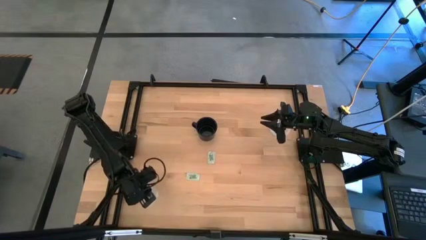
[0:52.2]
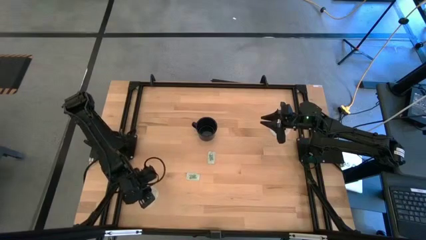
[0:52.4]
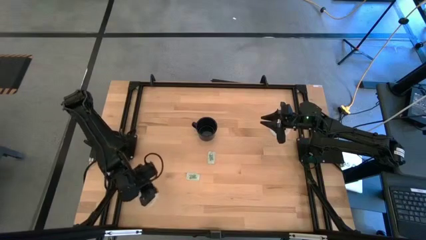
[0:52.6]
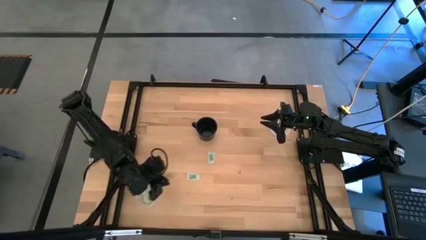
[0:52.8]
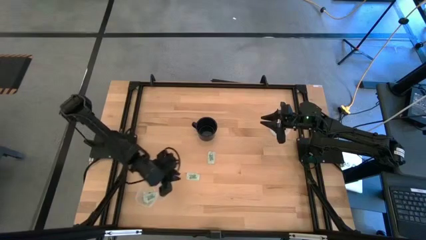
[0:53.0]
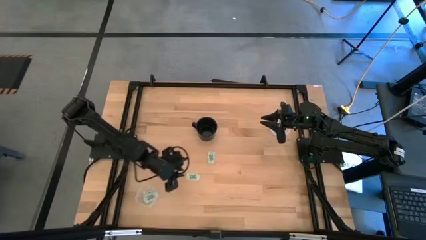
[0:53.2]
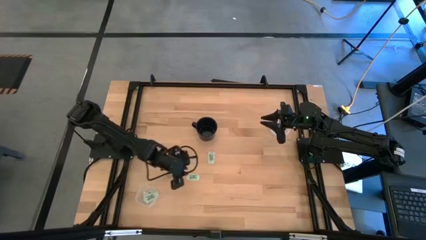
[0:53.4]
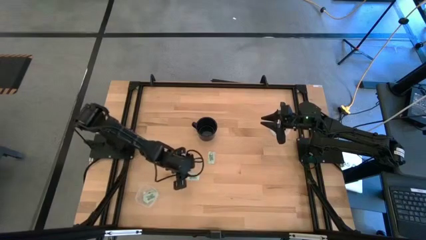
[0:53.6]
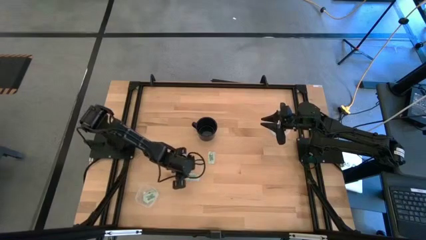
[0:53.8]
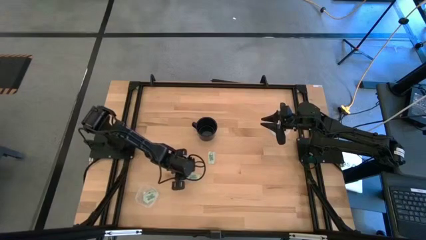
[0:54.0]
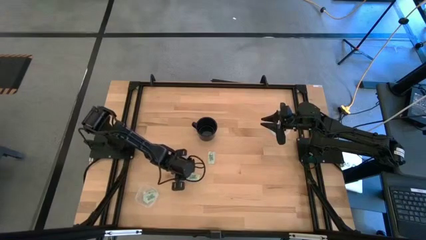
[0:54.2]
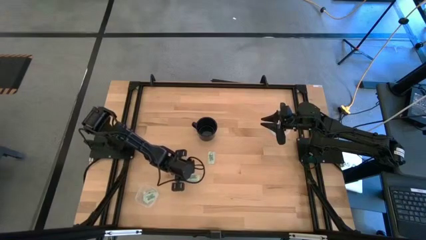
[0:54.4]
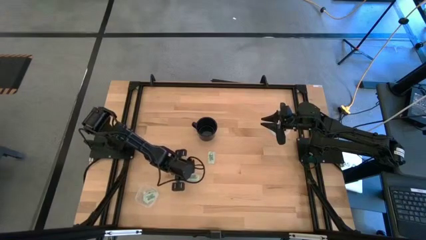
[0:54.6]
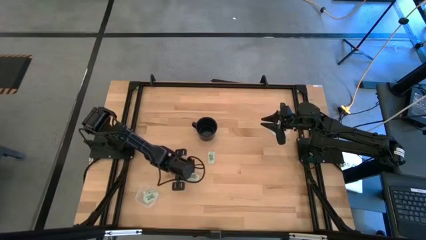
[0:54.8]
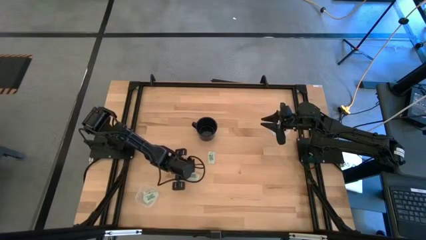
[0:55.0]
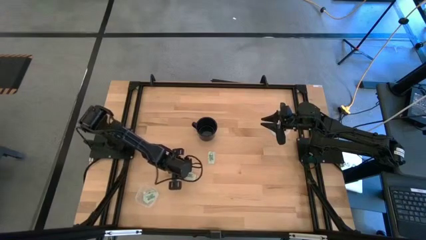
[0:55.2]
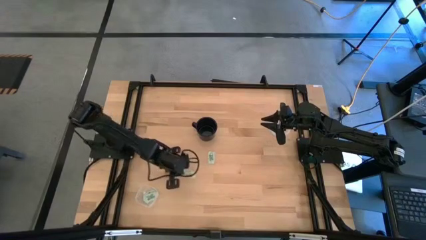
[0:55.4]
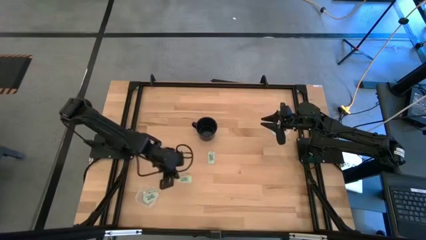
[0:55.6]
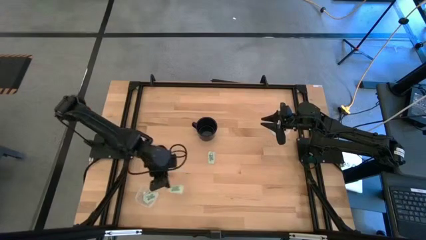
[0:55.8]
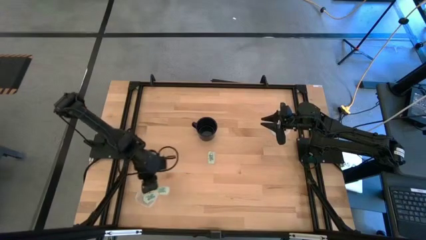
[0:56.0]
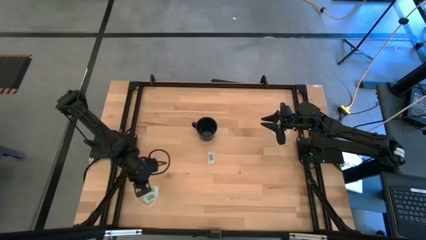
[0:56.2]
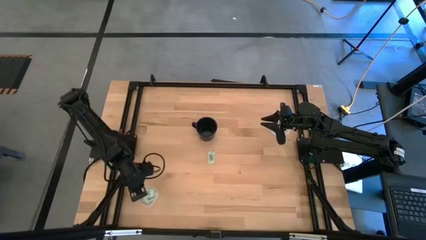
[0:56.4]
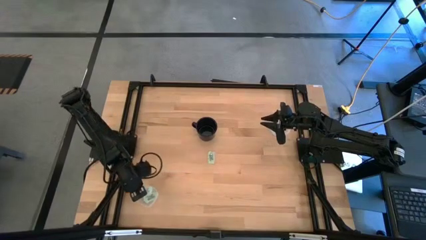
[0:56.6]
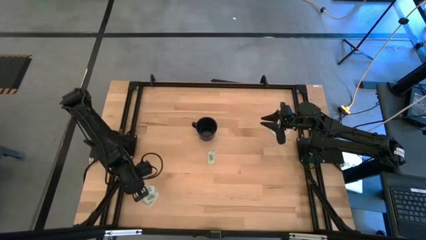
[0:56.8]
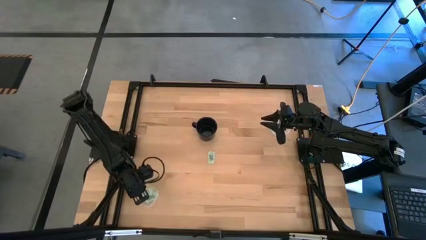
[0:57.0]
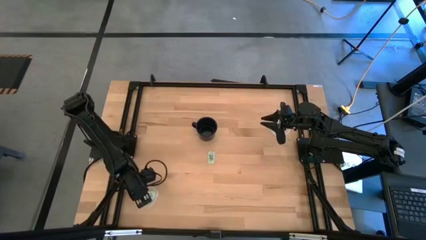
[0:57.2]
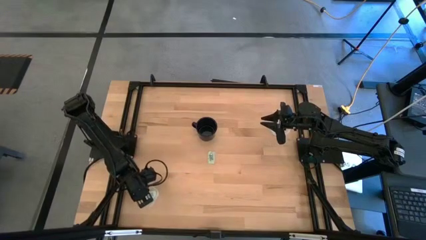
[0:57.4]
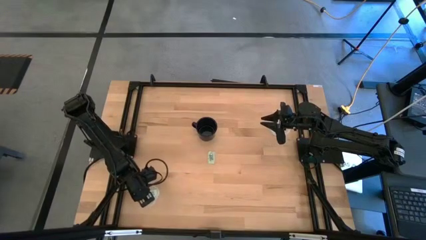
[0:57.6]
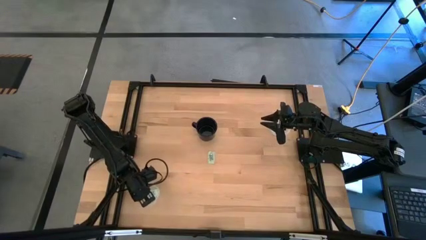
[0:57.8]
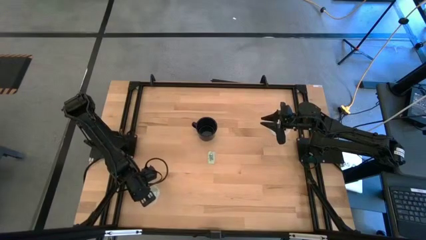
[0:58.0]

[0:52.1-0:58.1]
Task: Pick and place Stevia / Truvia into bins
Put the stevia packet into the square transparent container

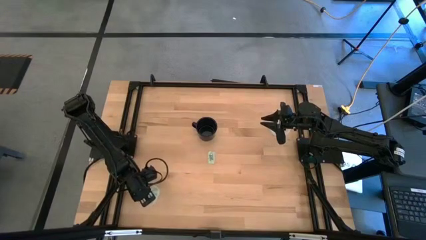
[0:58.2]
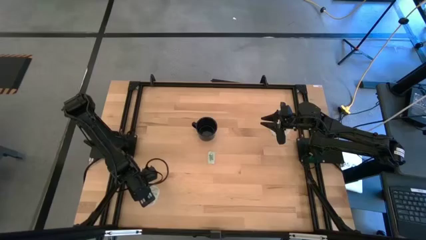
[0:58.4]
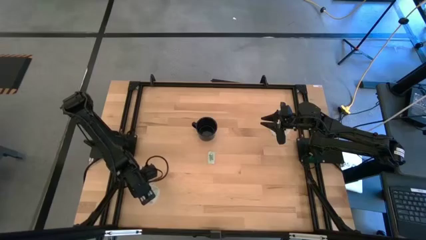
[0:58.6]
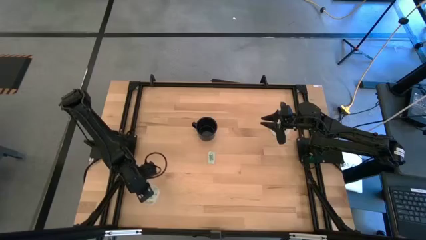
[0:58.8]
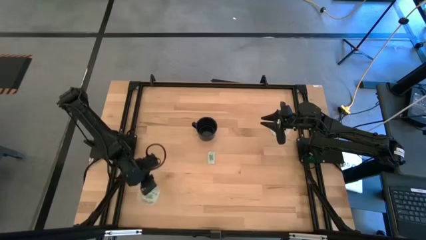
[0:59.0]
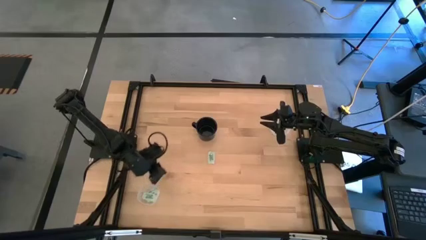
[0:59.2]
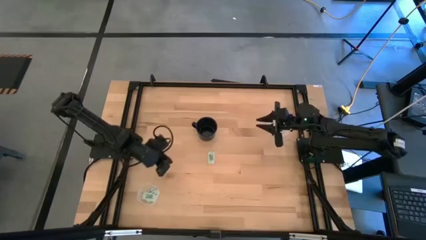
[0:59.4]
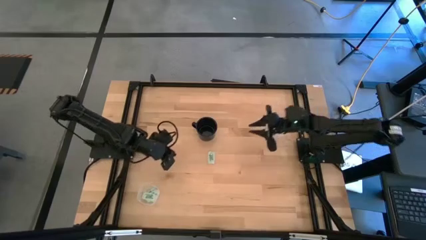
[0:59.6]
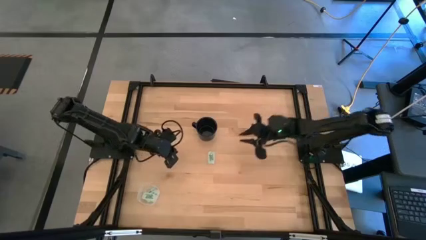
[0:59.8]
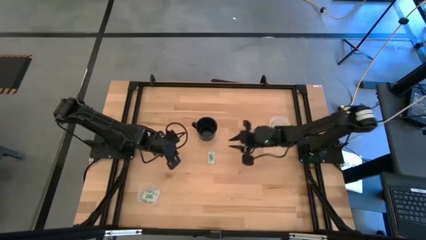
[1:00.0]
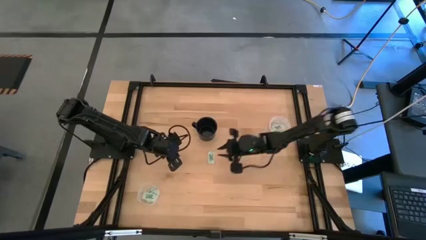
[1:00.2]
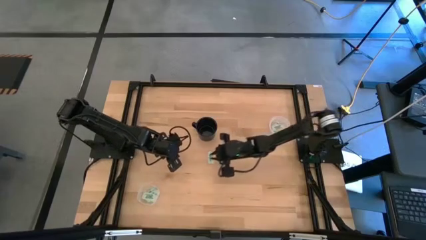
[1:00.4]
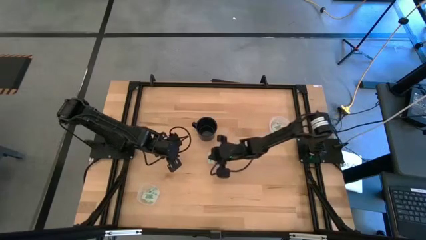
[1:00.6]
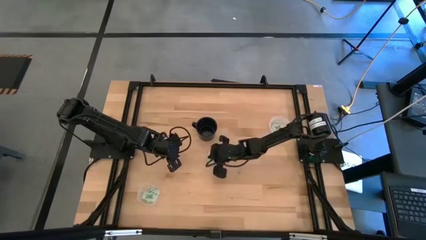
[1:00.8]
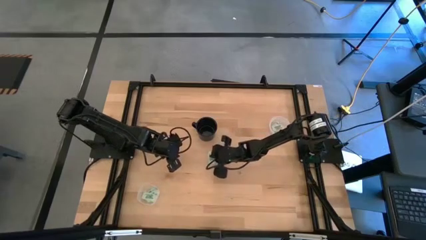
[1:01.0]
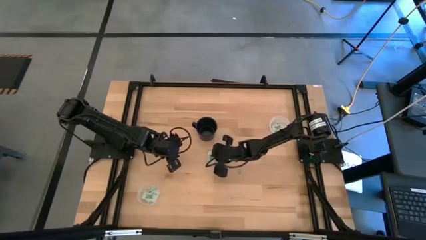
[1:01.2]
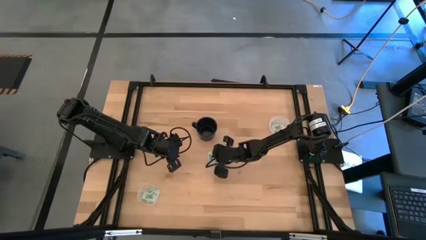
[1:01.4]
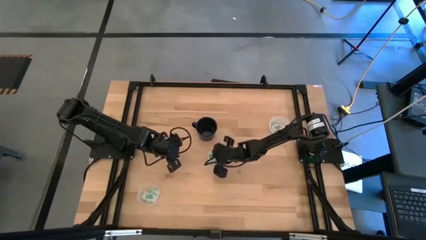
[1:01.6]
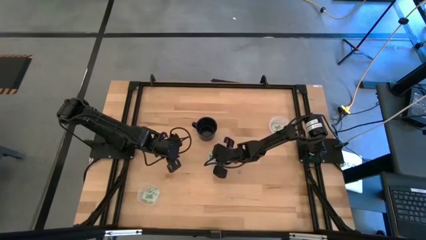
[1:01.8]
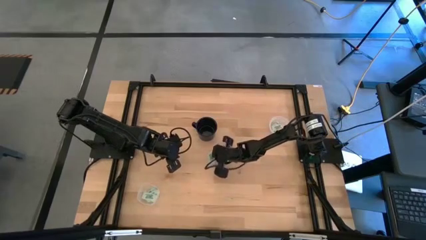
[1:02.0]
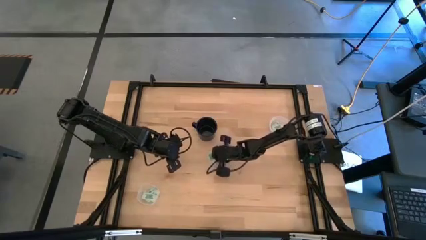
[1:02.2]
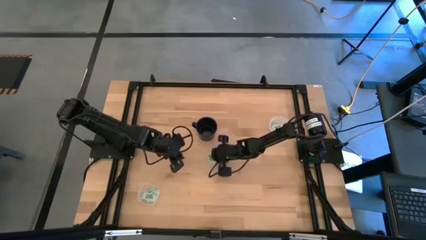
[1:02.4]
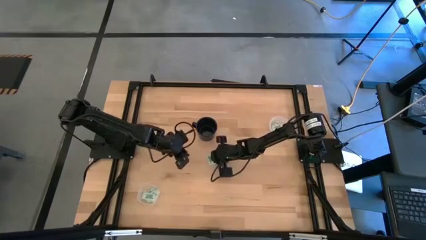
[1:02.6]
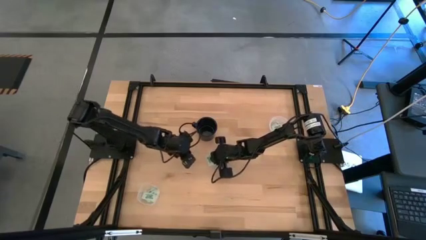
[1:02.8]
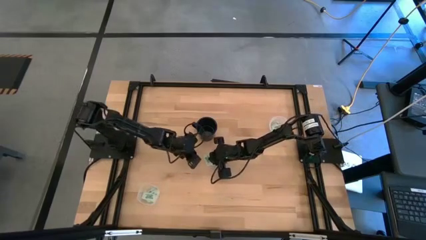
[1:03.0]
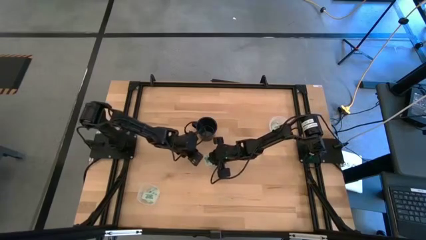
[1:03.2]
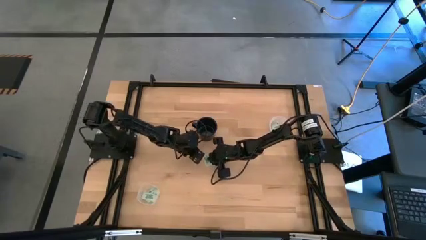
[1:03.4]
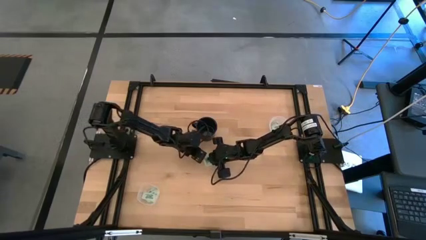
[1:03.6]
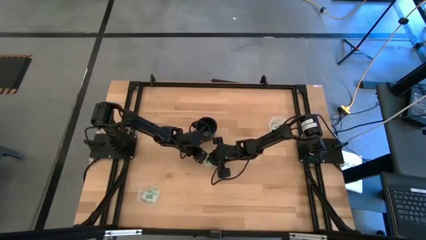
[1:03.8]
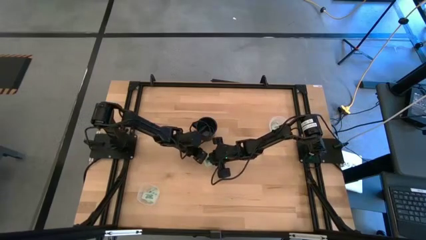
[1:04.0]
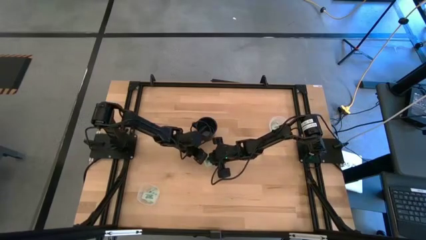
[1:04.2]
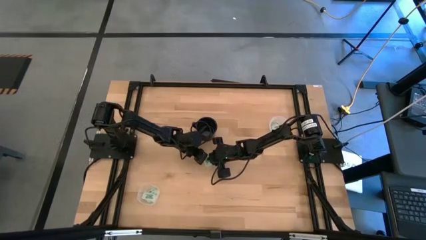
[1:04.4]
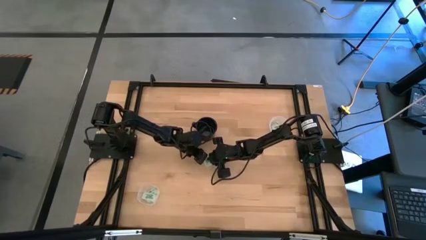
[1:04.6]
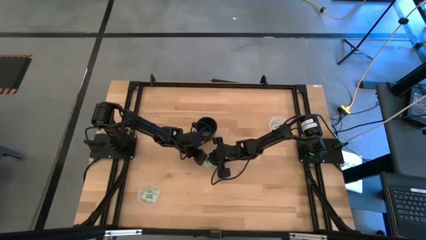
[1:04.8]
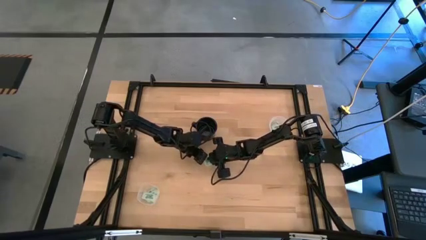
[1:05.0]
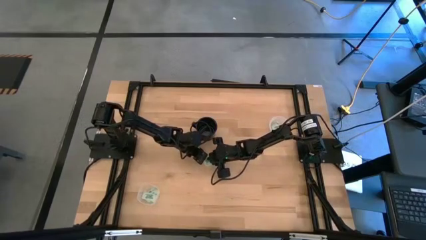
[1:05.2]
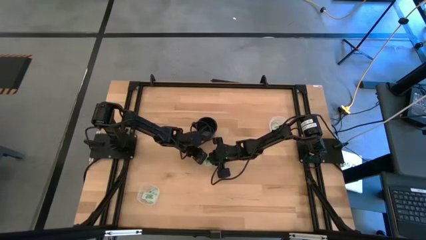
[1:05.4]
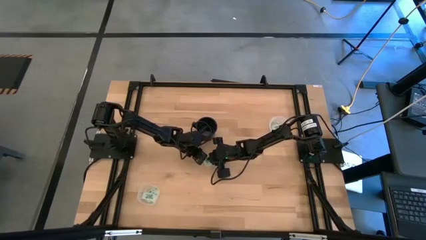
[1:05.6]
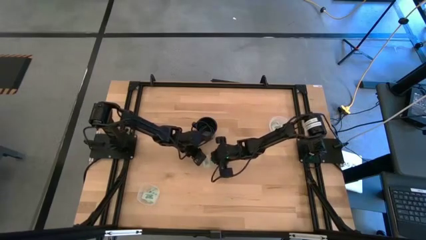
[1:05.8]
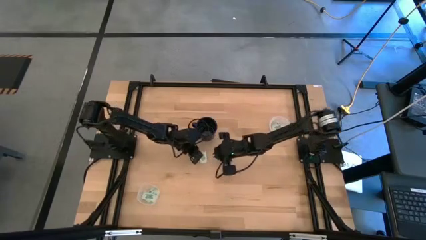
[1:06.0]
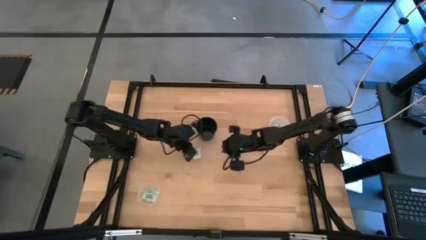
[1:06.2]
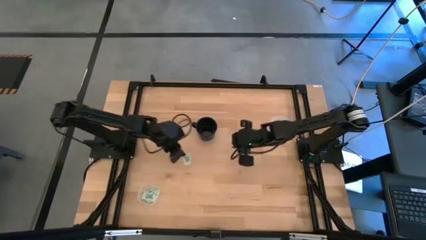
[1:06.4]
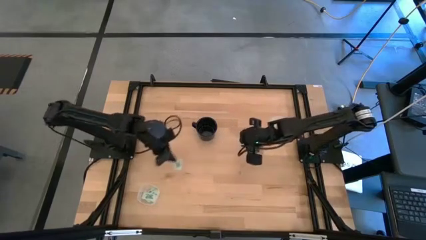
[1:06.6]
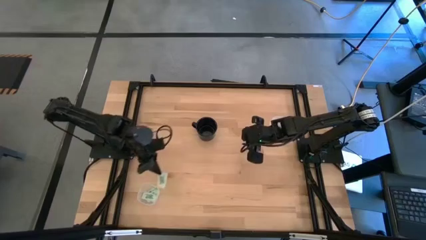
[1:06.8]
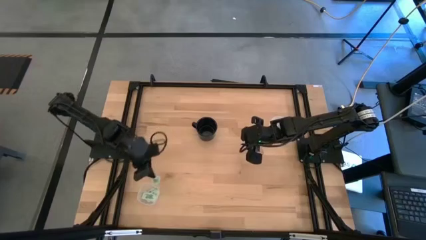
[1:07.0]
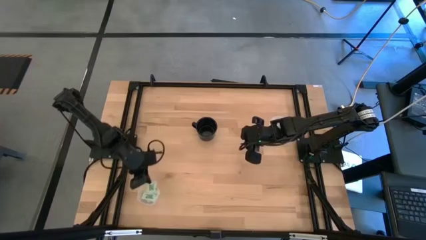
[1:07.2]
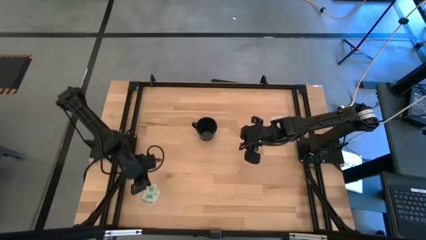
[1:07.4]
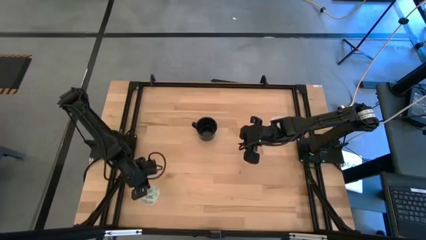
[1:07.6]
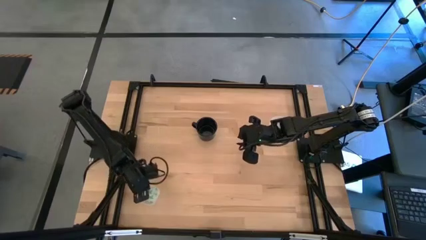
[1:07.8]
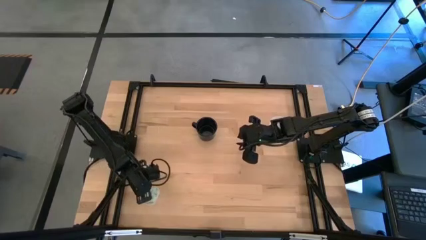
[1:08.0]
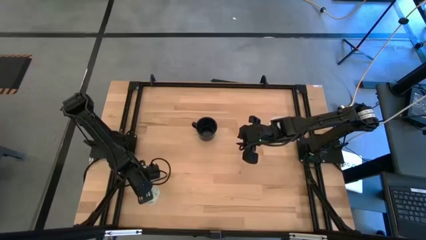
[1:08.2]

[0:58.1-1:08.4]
Put the stevia packet into the square transparent container
